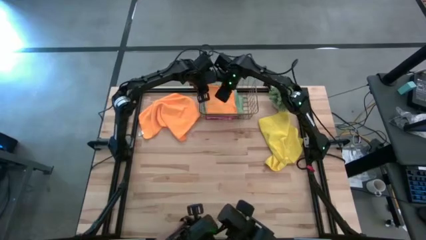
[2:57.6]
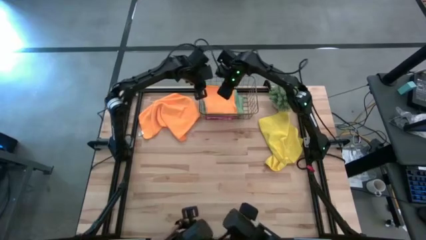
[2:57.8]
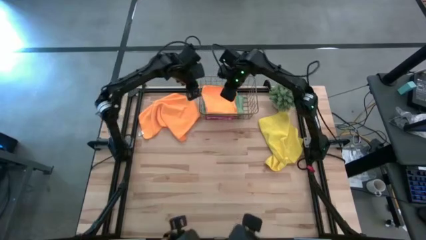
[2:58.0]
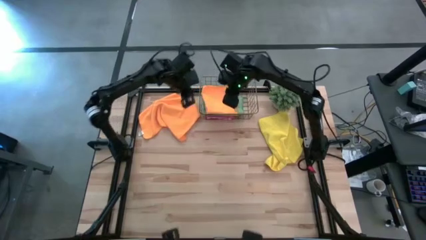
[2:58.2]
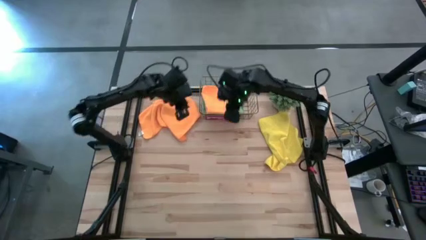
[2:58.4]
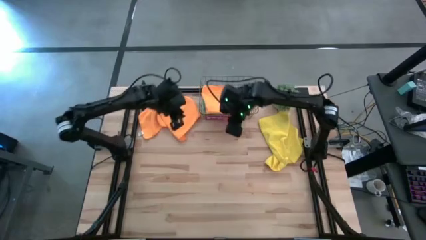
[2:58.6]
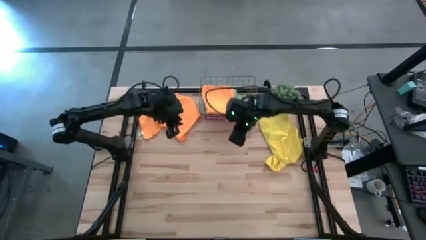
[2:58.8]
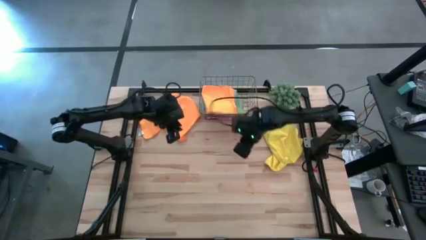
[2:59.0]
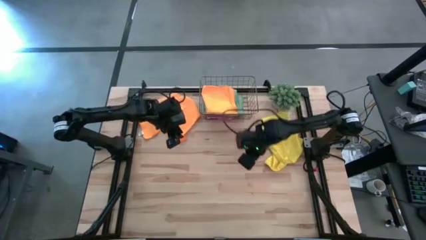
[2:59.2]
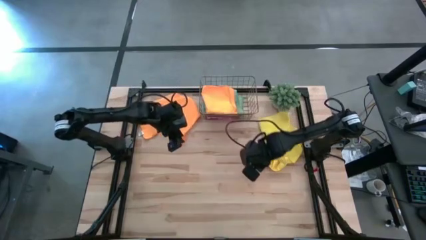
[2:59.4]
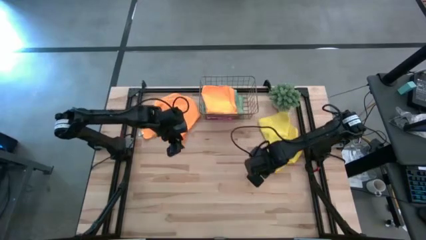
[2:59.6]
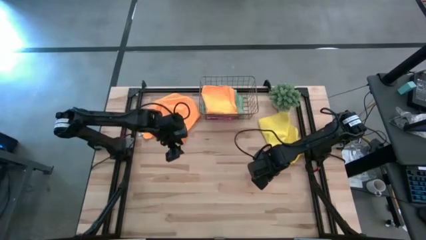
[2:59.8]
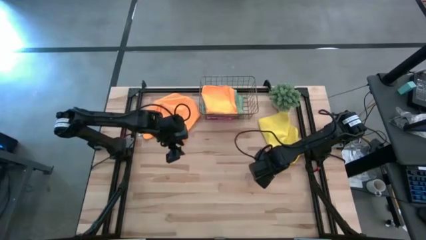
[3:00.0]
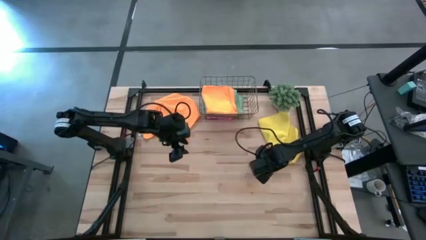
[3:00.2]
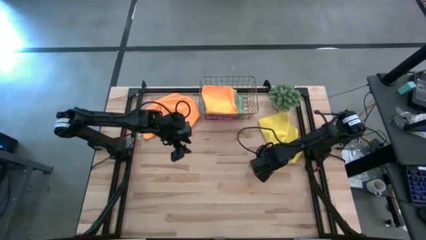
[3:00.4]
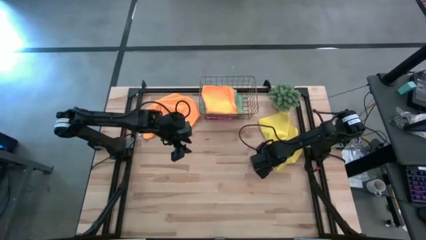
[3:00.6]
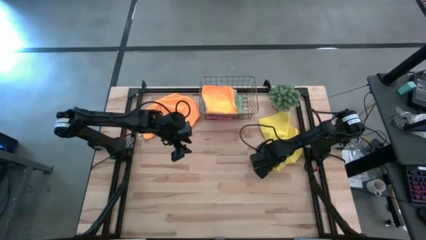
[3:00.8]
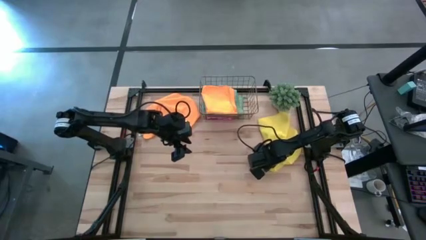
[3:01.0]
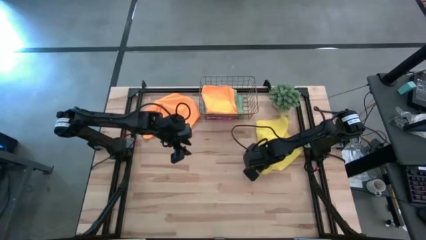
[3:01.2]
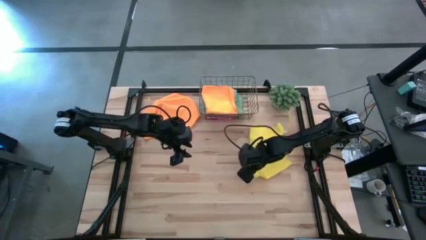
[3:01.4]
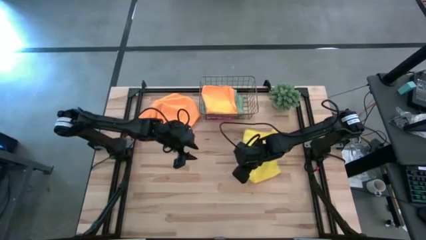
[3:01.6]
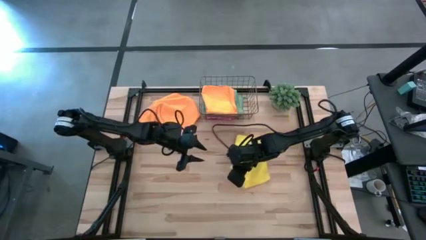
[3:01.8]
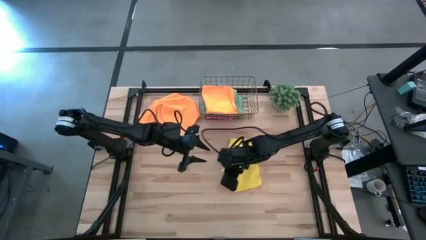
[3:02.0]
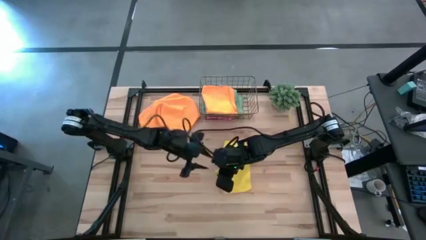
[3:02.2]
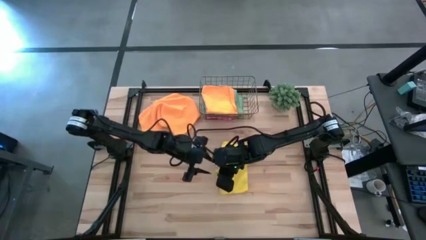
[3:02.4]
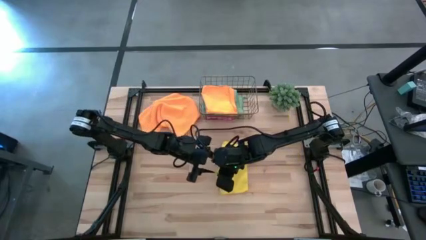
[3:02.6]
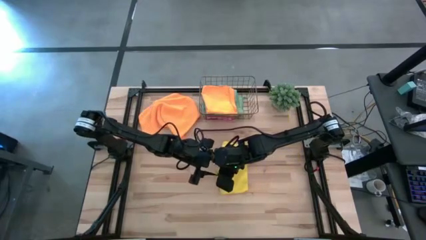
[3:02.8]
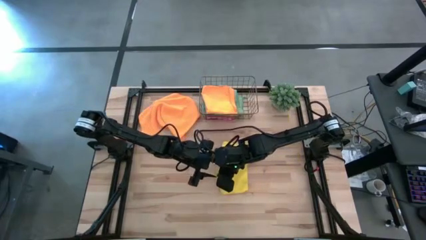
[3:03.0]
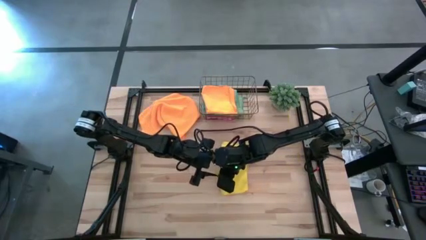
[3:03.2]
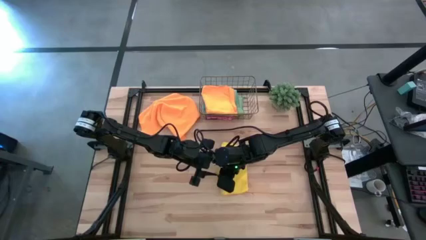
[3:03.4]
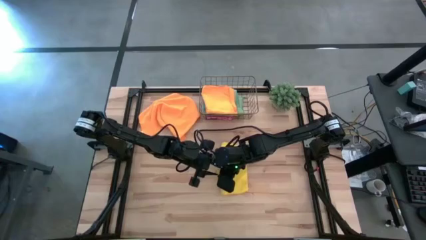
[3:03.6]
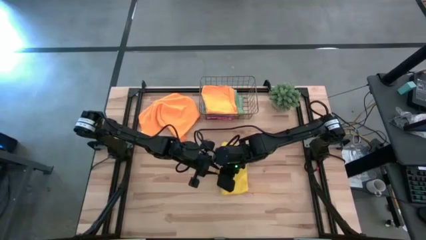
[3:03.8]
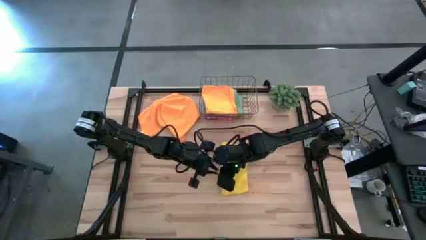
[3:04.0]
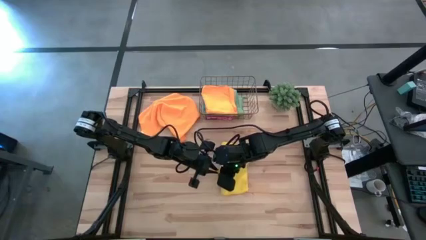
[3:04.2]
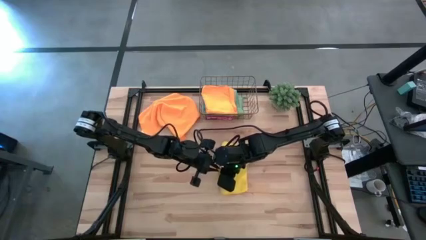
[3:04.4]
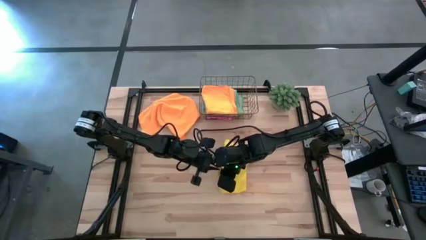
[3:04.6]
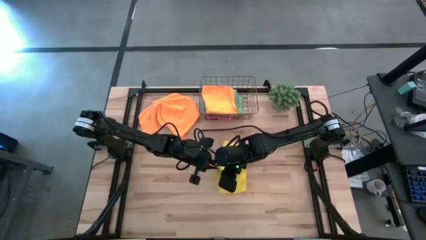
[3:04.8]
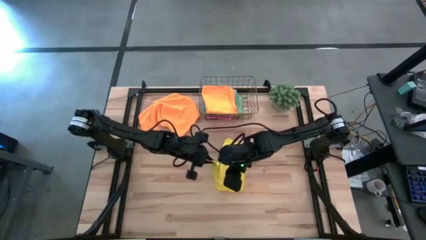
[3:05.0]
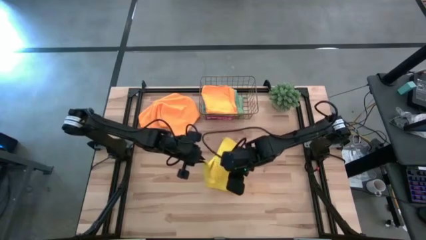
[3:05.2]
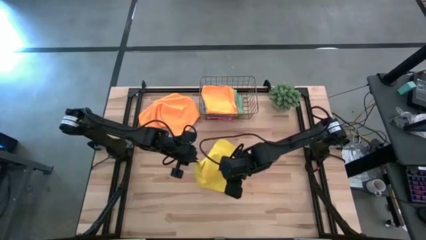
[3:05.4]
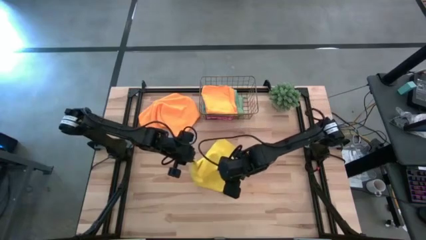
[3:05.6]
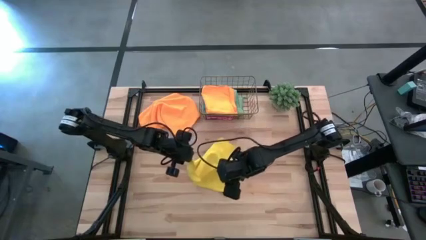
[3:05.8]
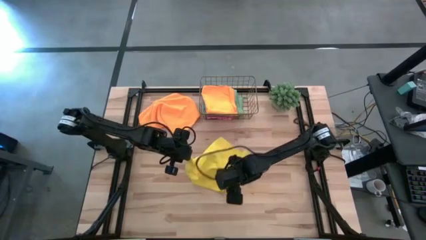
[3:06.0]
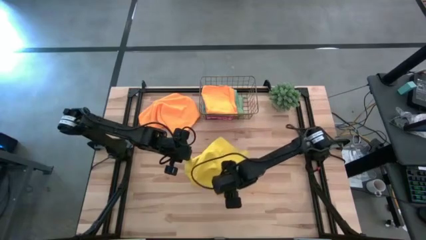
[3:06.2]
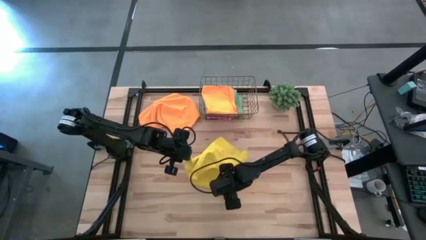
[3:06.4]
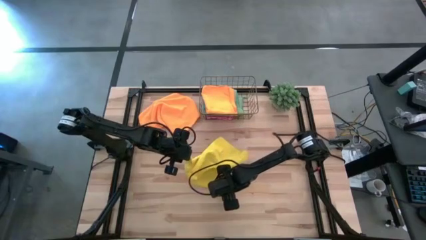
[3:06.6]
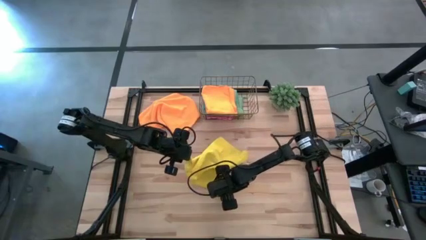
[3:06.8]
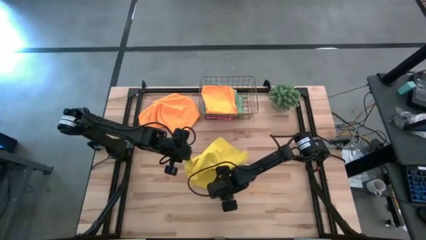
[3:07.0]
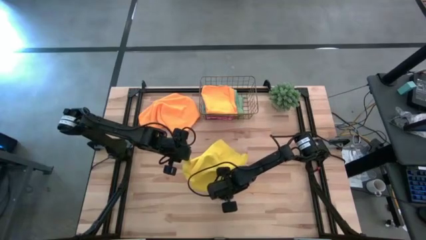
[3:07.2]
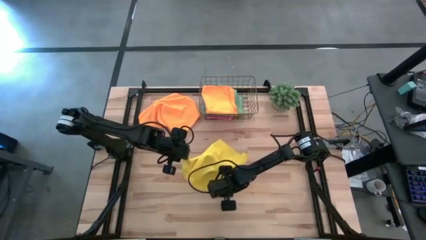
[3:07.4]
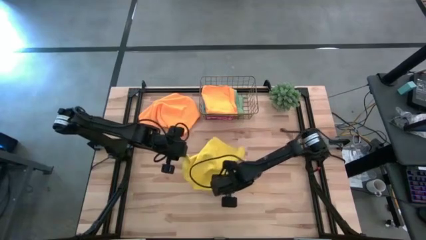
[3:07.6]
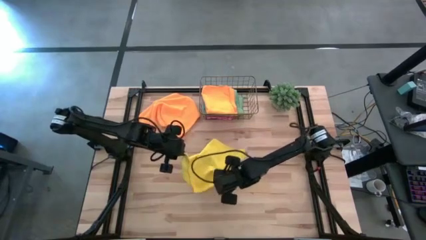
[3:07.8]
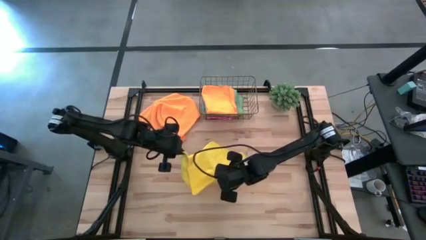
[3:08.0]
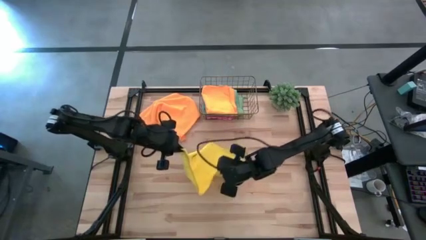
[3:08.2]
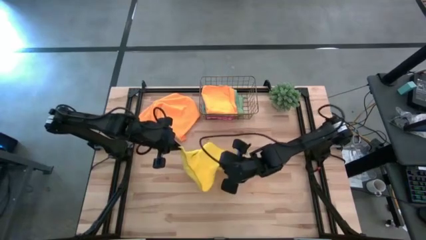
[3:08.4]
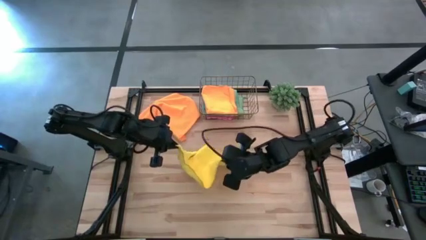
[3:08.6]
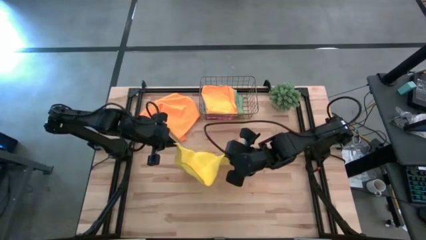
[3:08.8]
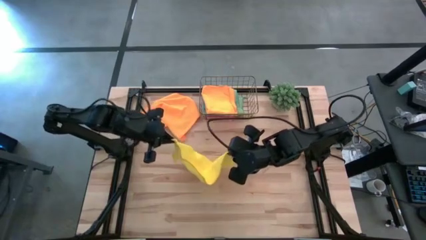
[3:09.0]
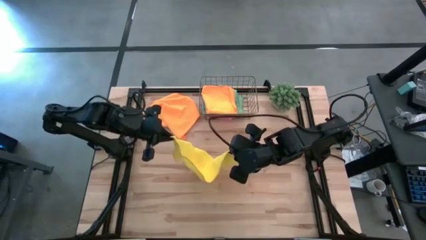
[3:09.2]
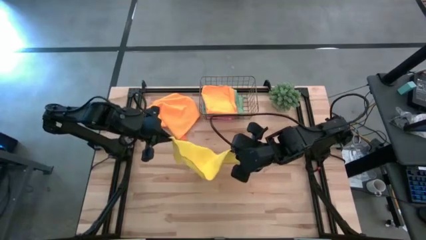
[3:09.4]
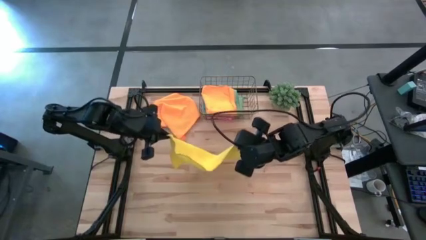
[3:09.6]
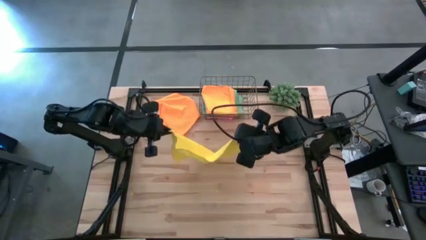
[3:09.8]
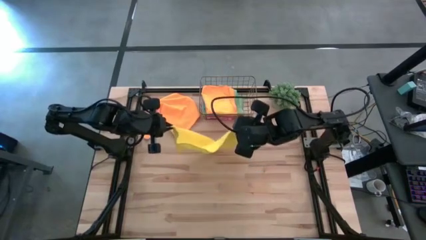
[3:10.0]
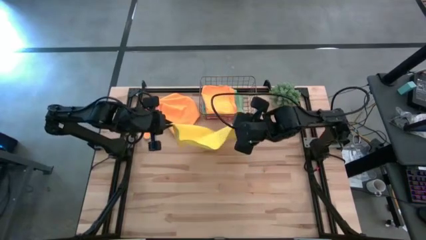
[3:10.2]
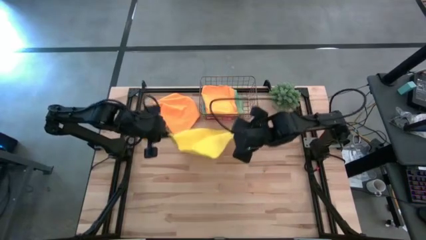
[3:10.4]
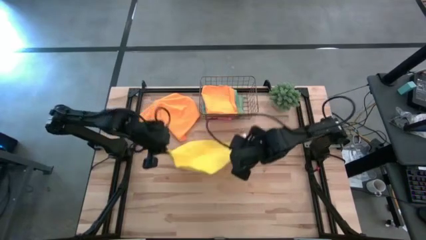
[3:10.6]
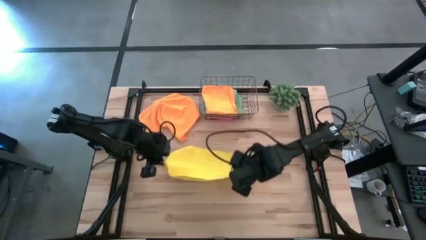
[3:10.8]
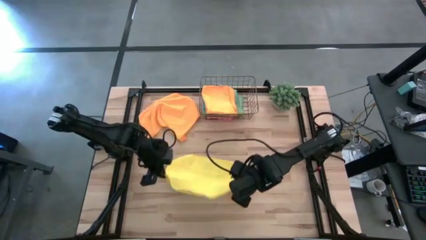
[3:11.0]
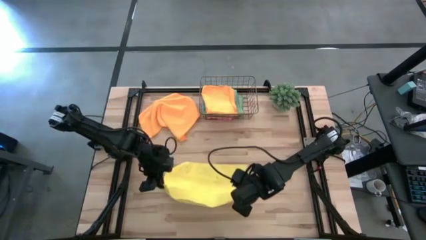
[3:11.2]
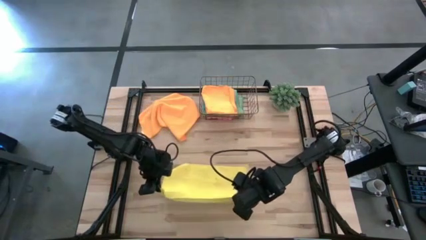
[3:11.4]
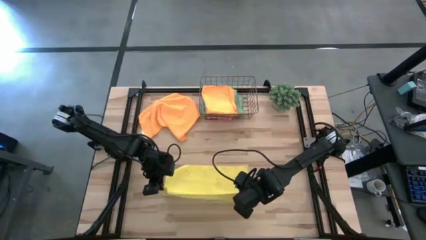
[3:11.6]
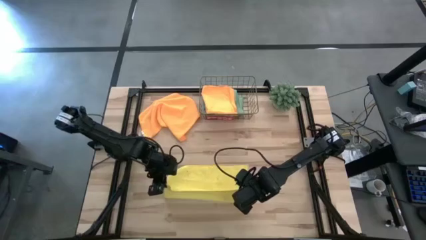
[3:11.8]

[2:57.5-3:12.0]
Task: Fold microfiber towels
Fold the yellow microfiber cloth

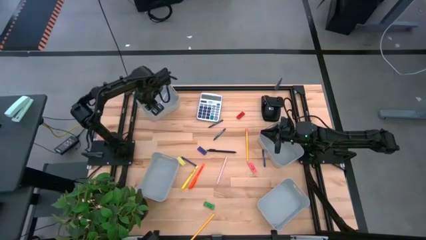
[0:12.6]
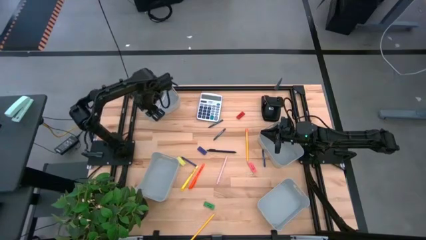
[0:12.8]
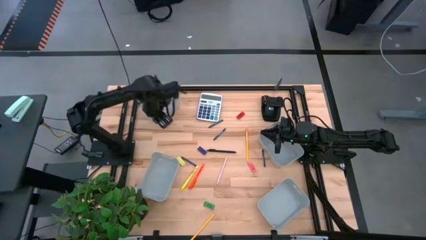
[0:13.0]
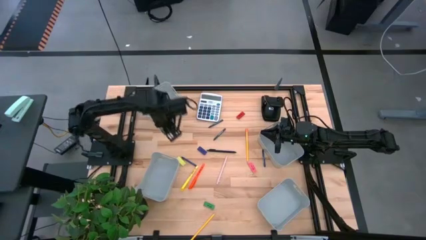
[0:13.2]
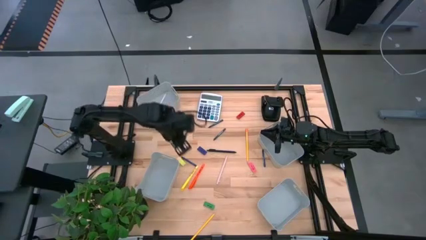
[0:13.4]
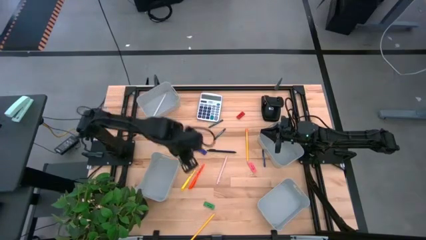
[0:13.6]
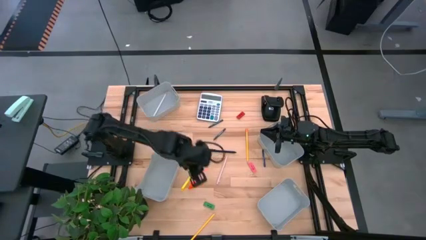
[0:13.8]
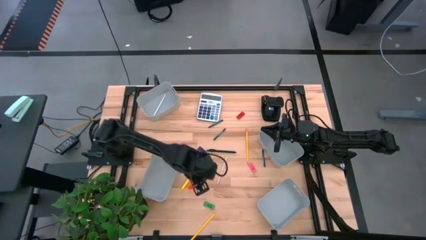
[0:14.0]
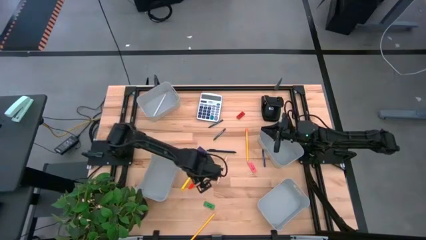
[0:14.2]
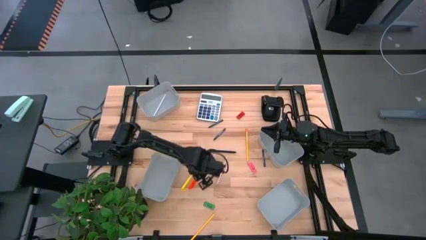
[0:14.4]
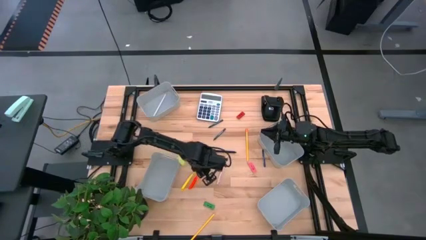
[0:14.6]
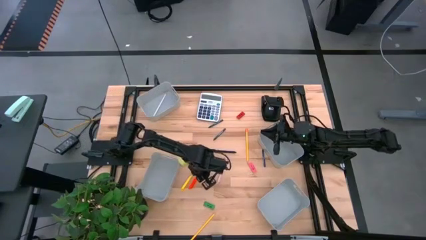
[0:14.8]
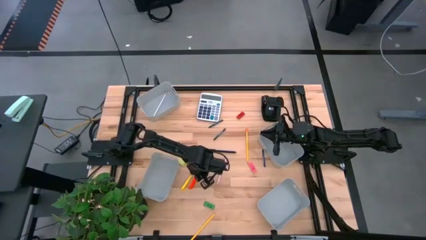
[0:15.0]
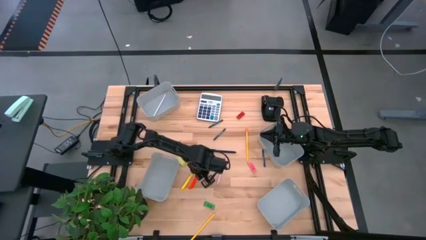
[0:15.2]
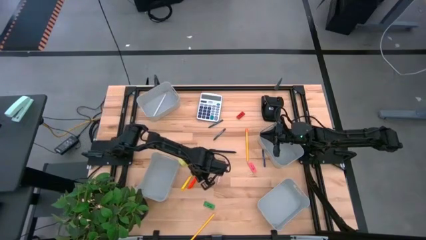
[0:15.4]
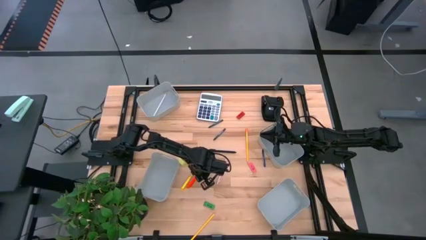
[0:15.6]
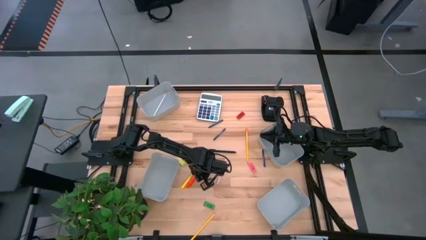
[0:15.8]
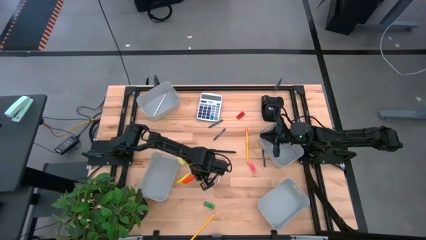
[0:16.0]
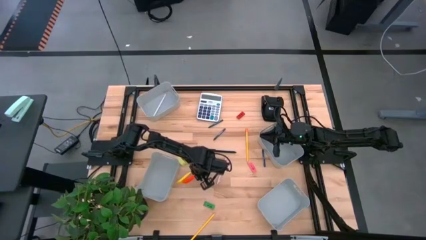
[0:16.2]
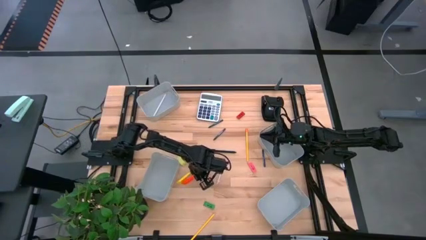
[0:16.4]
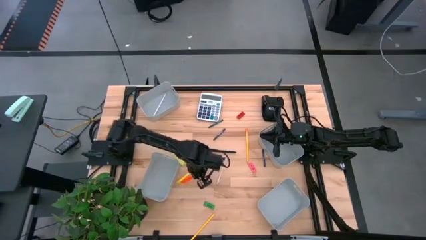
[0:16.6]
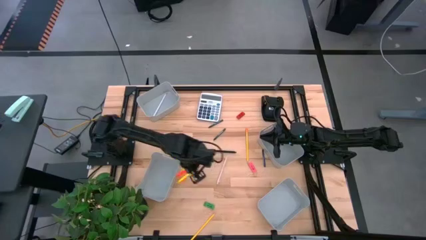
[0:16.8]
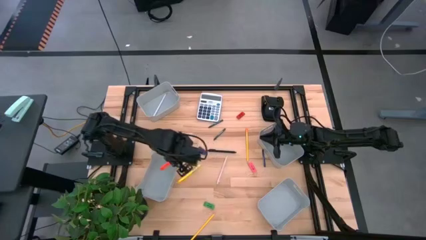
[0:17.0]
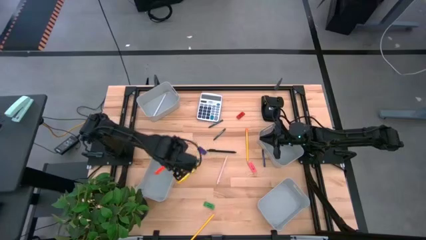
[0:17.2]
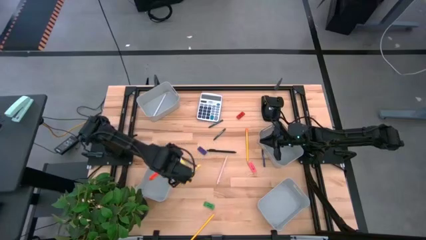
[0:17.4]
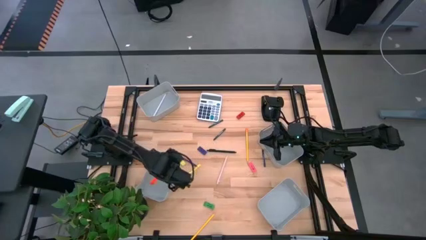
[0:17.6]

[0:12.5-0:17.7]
Task: Sort crayons/erasers/pens/pencils in bins
Put the orange ballpen into the bottom left gray bin
